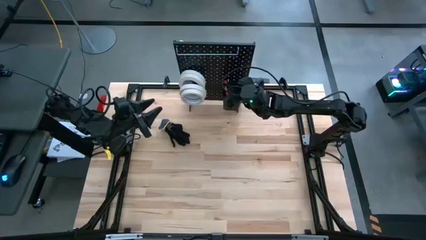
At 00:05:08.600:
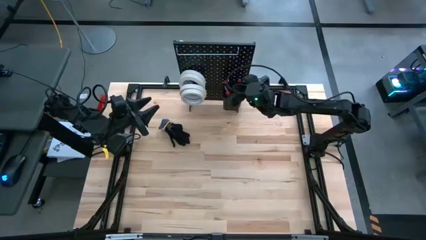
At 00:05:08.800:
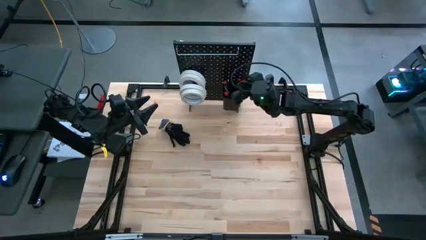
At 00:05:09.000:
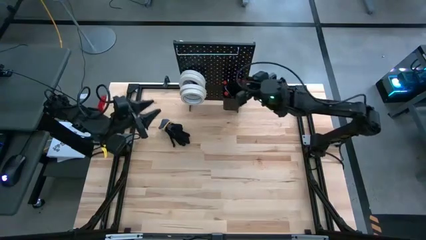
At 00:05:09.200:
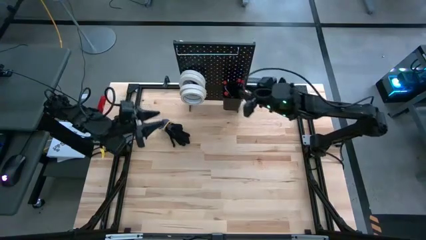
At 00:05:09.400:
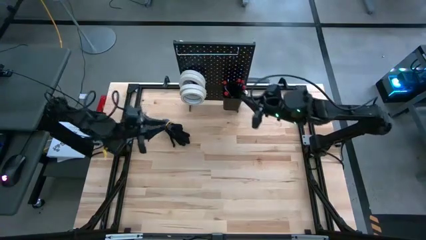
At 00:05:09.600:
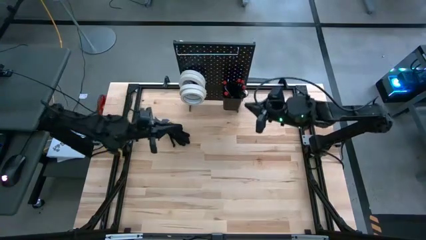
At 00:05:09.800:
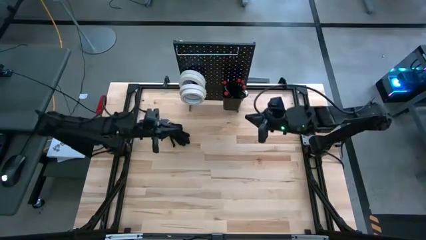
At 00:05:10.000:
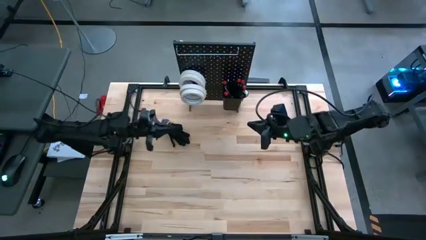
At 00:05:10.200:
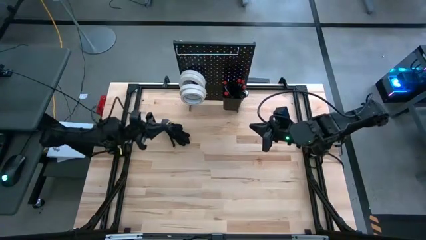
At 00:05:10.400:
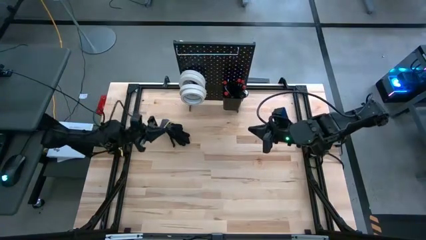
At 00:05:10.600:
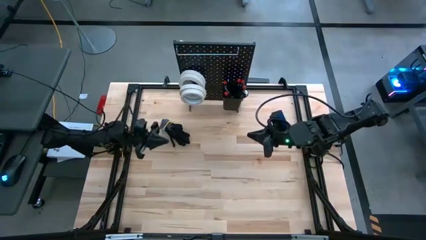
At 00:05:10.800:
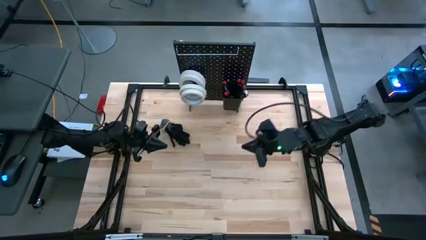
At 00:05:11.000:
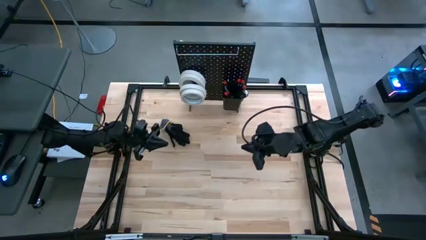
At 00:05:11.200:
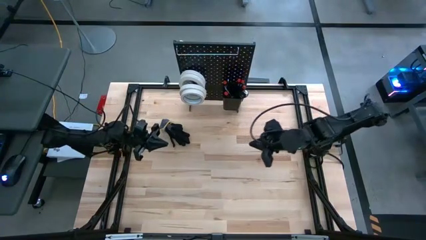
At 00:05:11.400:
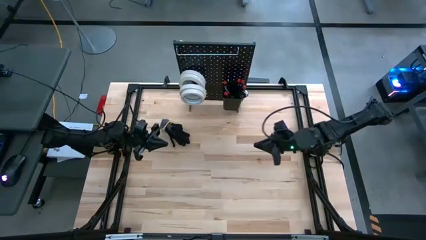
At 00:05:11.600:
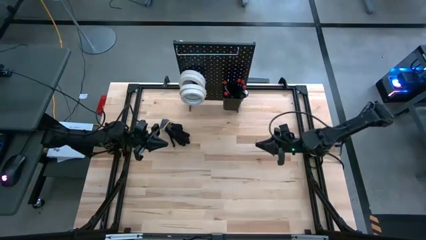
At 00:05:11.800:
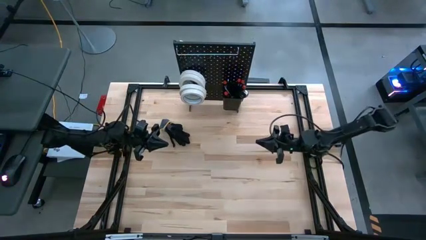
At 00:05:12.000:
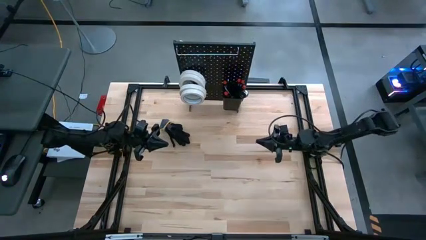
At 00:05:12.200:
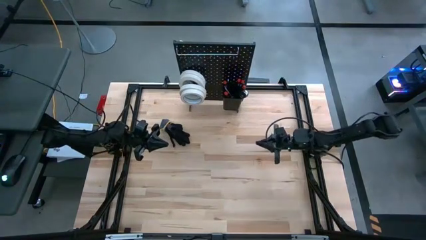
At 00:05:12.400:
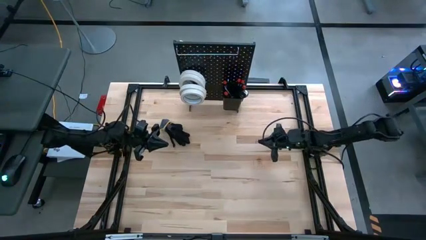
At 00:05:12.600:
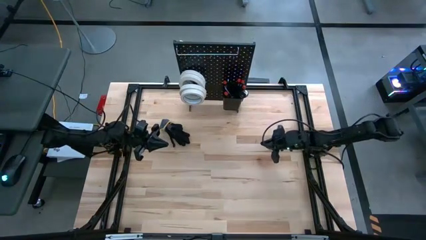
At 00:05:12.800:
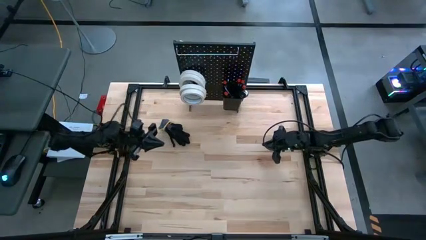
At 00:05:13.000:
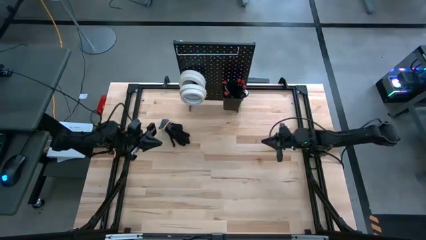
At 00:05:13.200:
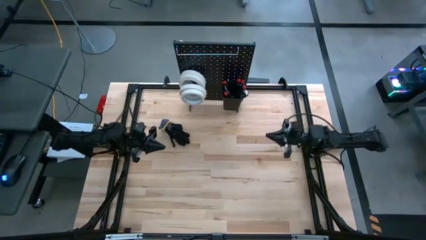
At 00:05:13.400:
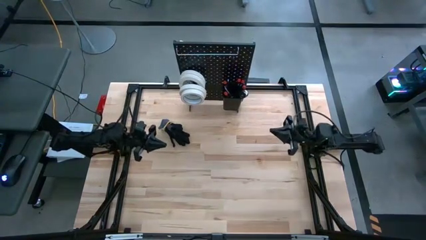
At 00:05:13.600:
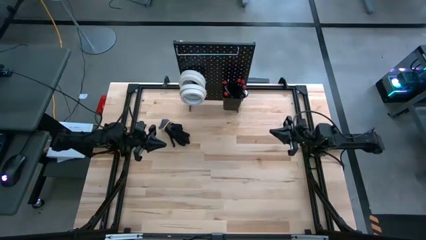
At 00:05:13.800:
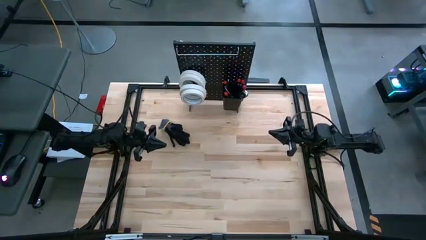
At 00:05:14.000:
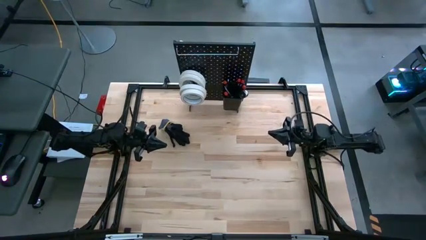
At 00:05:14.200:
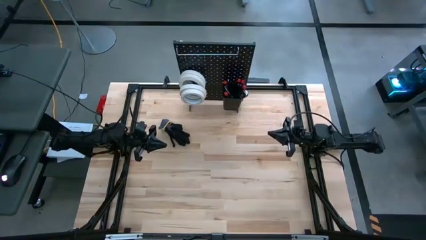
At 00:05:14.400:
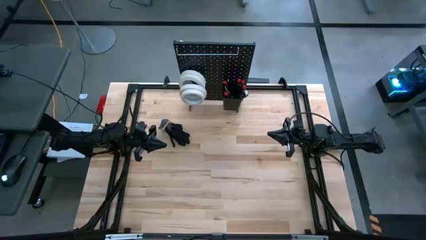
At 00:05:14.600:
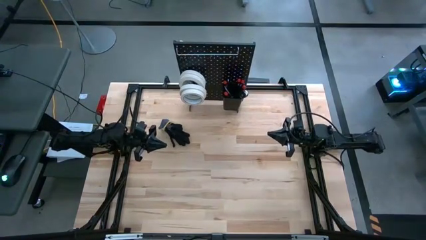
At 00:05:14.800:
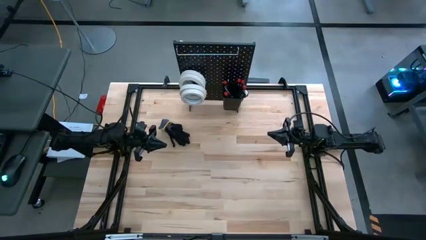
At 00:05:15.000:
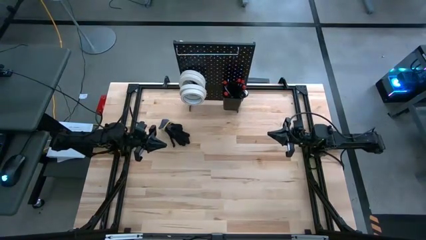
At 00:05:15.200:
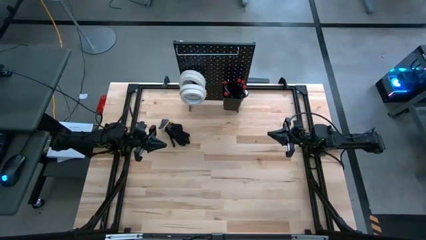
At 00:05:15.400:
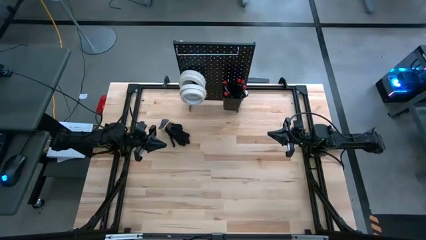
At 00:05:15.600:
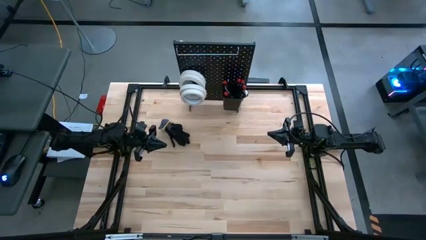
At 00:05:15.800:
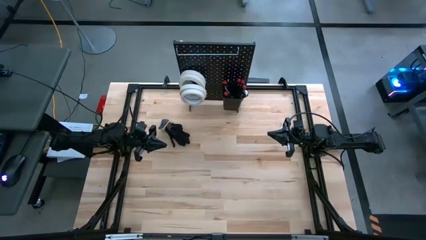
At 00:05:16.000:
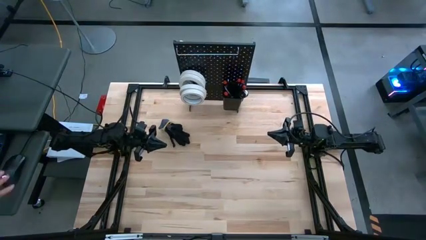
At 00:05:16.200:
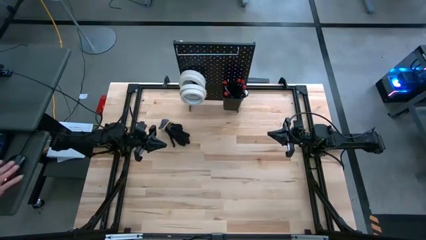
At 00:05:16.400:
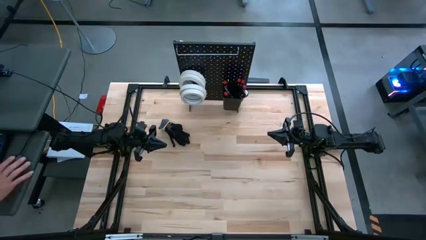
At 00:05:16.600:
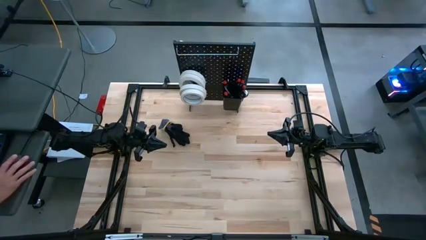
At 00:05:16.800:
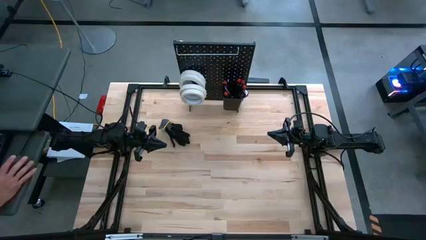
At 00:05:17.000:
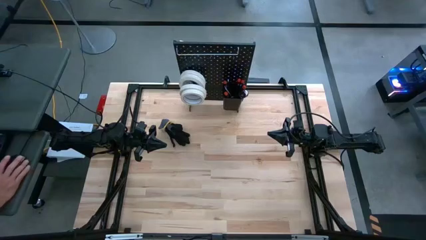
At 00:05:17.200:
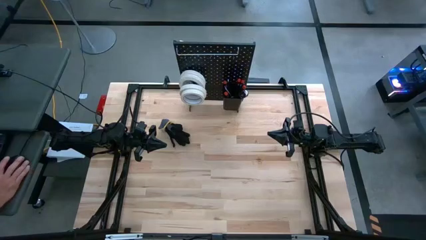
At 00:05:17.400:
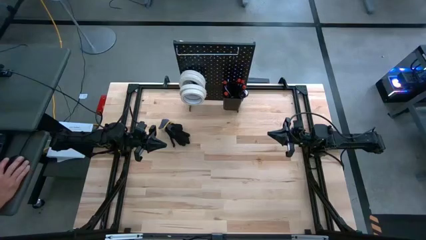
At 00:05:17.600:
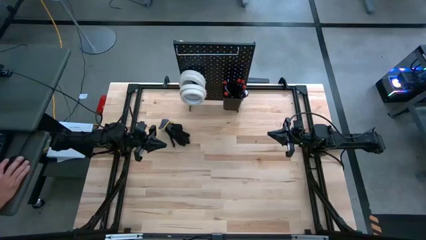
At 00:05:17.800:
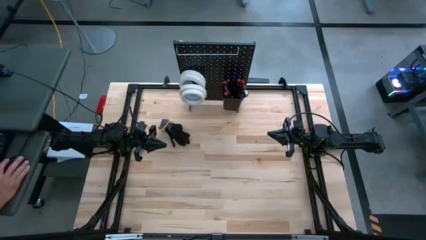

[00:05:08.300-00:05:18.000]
Task: Hang tools onto peg board
Return to Home Position

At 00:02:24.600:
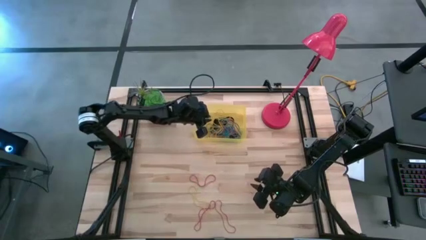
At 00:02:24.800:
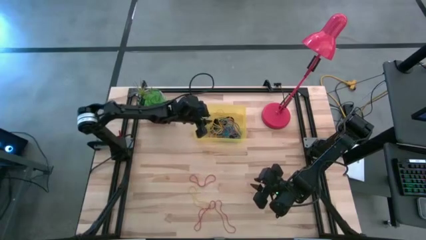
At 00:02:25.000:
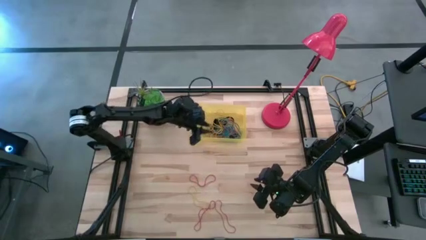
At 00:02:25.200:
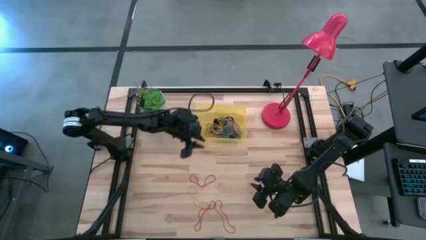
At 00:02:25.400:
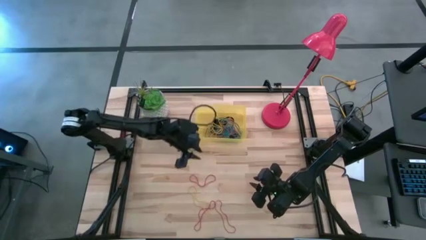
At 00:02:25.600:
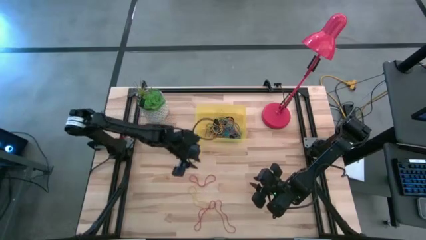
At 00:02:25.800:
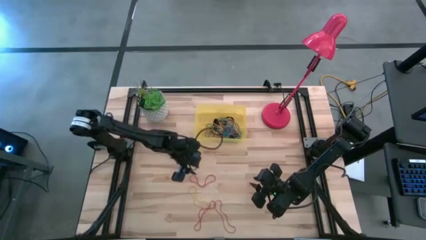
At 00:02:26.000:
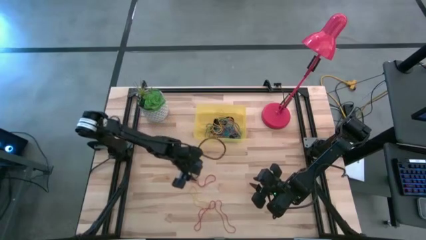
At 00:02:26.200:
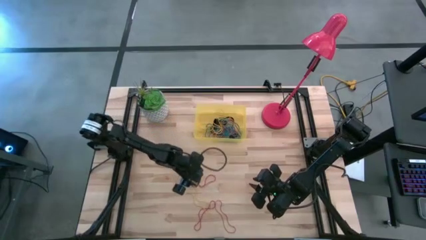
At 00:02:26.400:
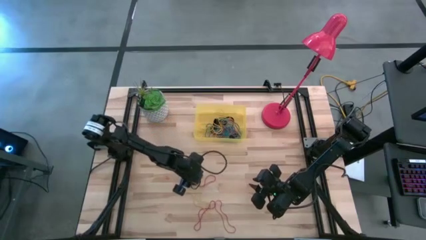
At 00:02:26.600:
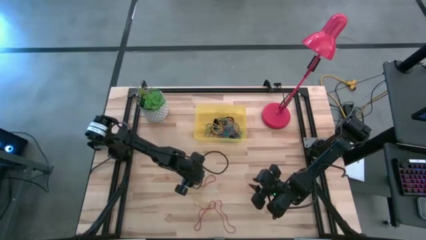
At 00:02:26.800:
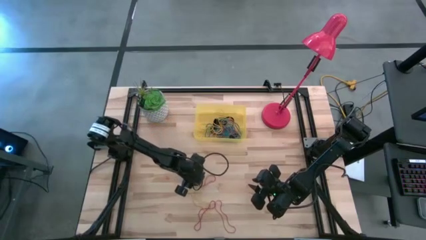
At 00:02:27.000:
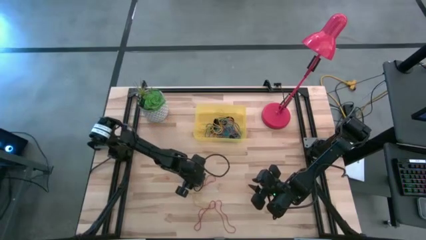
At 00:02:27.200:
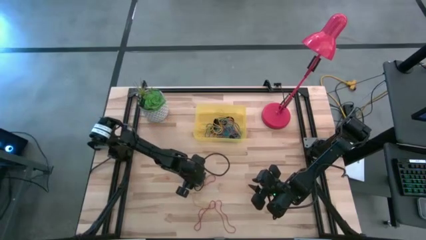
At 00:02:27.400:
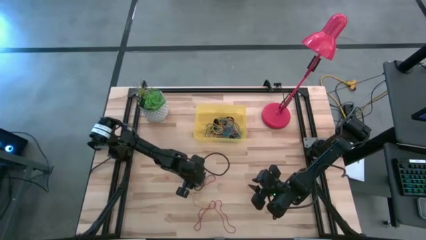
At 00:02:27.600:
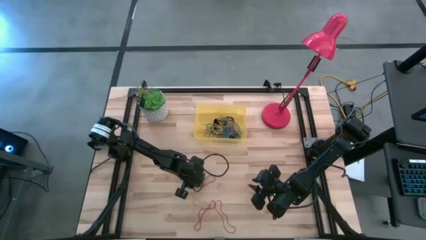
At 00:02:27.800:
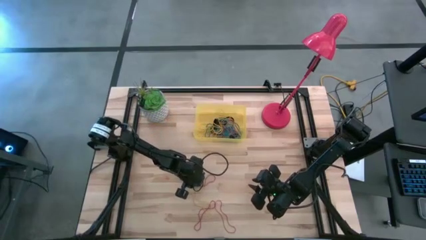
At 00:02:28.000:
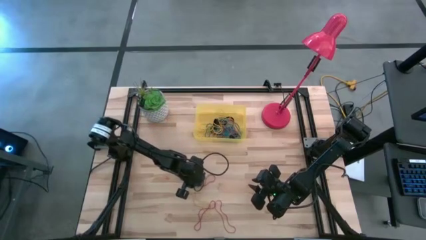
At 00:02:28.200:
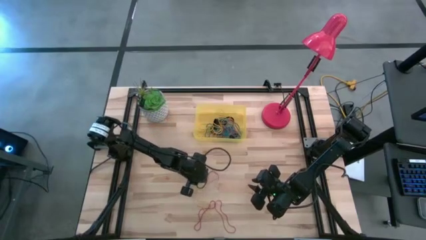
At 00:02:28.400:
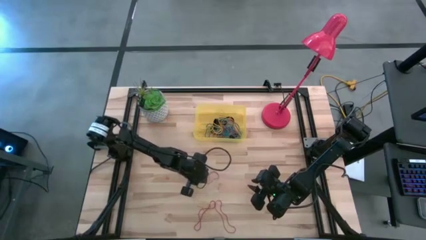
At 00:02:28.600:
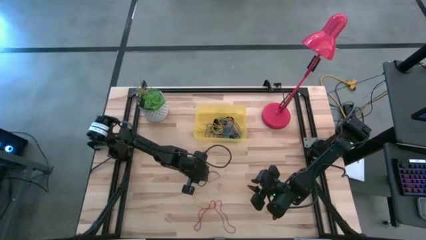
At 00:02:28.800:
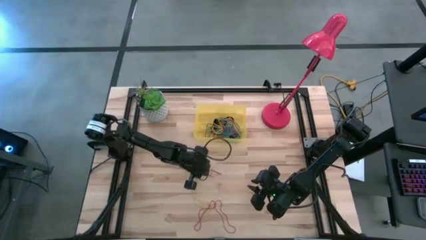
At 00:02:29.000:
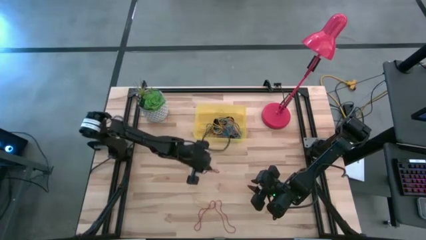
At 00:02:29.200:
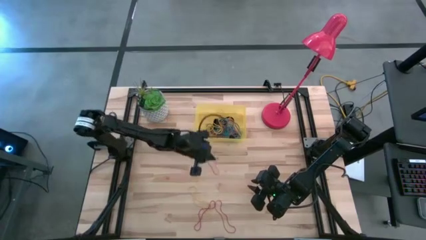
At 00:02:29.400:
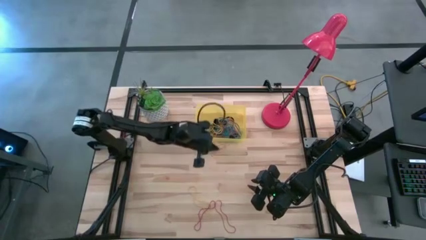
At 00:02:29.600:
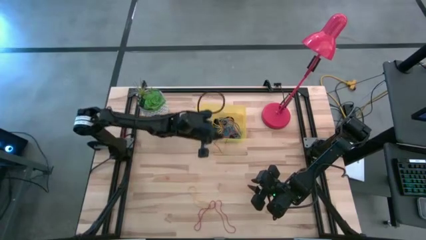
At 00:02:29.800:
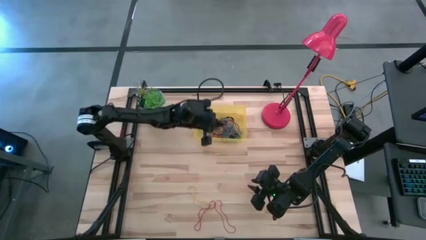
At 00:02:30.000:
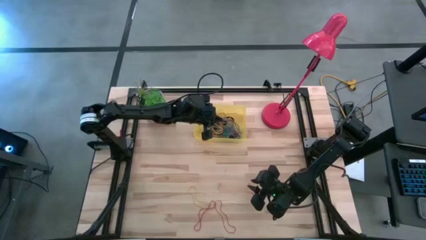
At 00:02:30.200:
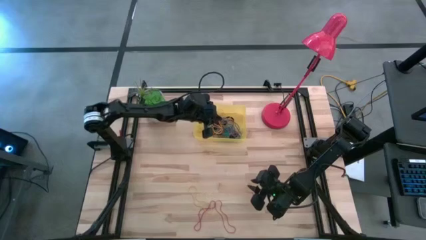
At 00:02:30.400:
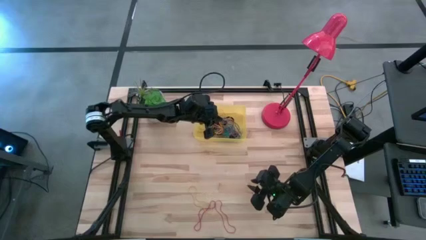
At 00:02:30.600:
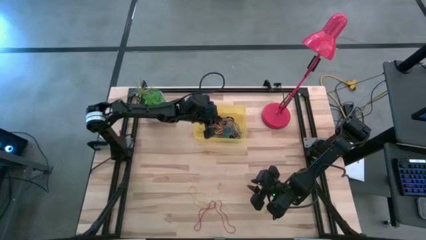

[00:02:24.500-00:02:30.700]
Task: Pick and place rubber bands into bin
Put the red rubber band into the yellow bin
